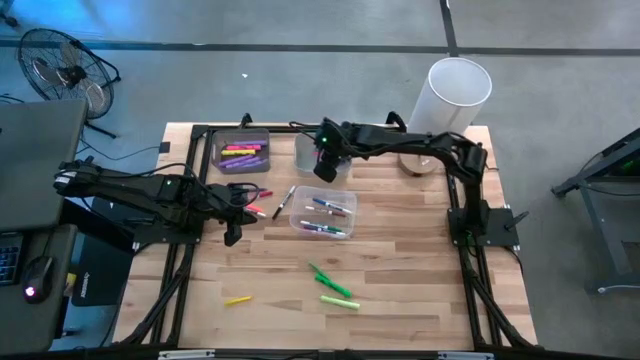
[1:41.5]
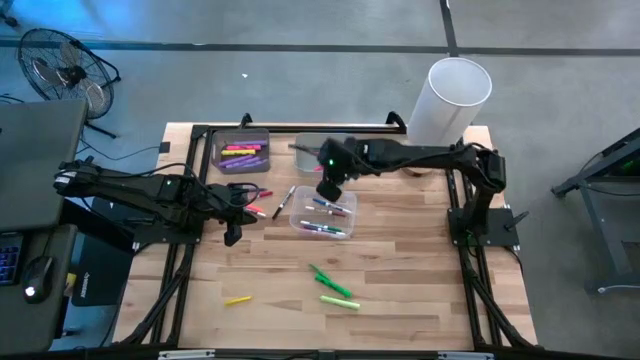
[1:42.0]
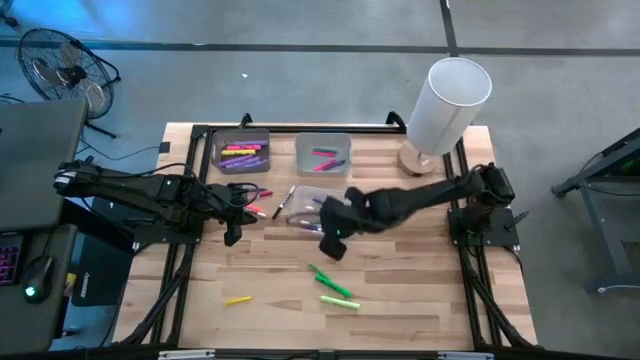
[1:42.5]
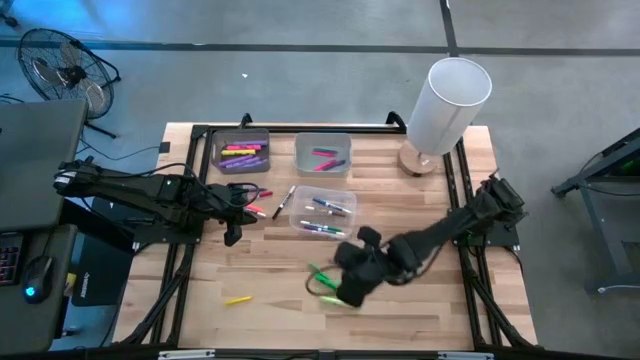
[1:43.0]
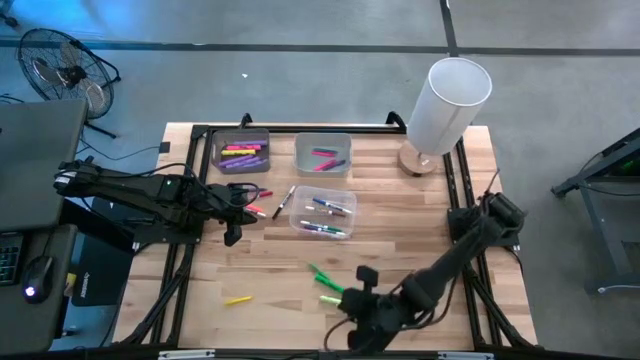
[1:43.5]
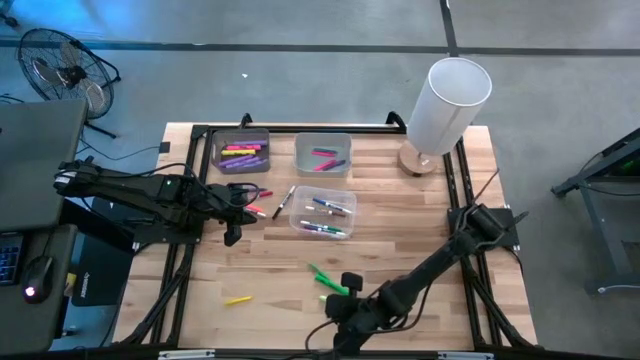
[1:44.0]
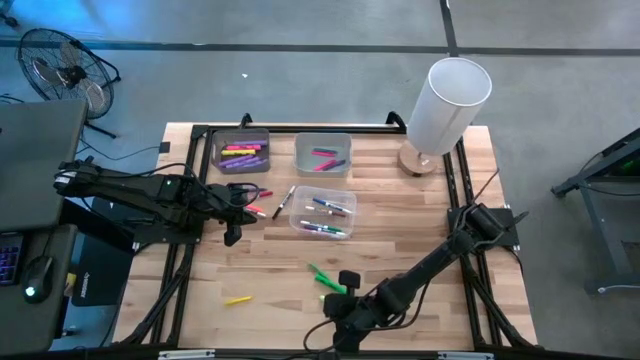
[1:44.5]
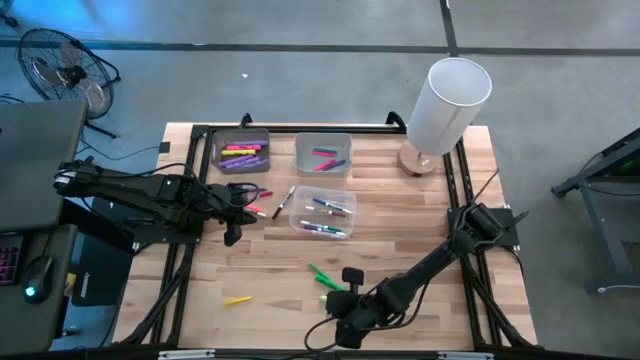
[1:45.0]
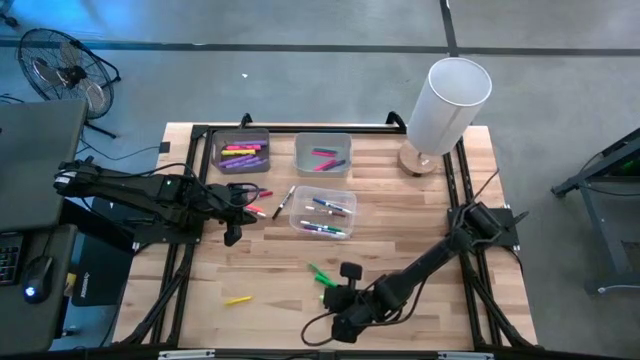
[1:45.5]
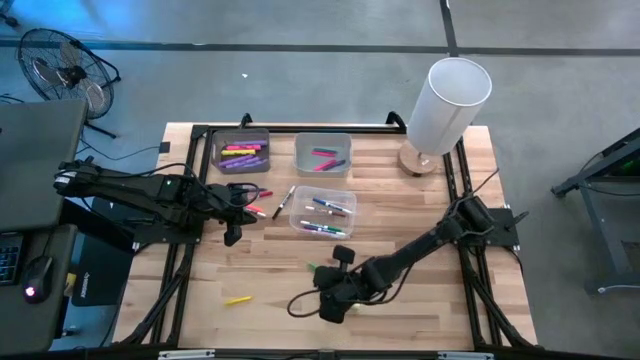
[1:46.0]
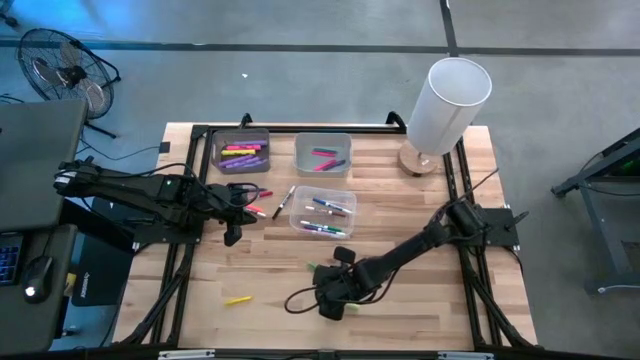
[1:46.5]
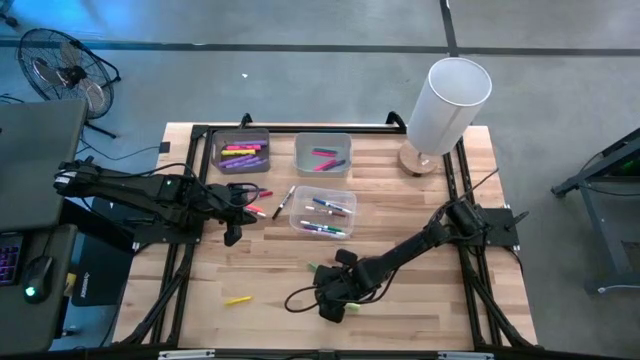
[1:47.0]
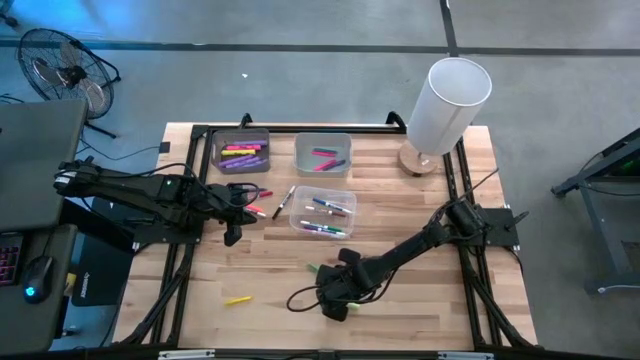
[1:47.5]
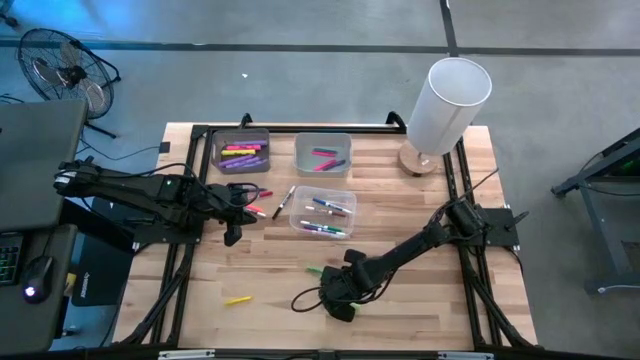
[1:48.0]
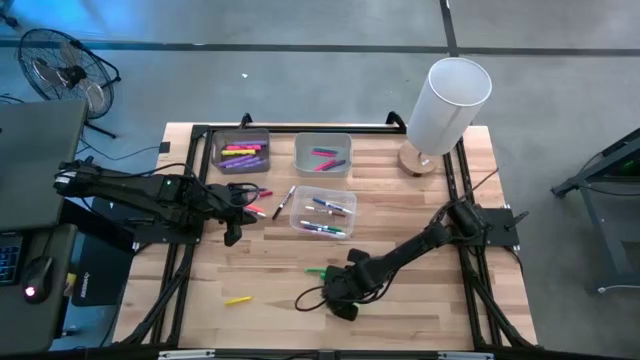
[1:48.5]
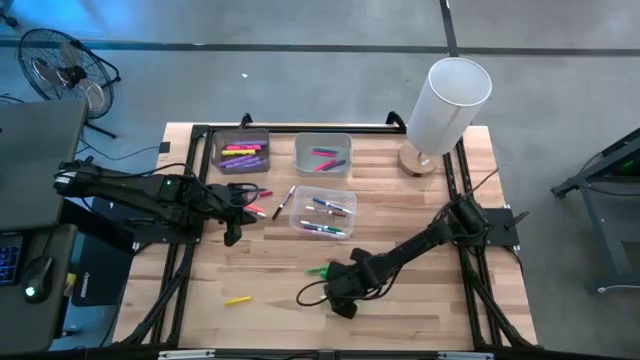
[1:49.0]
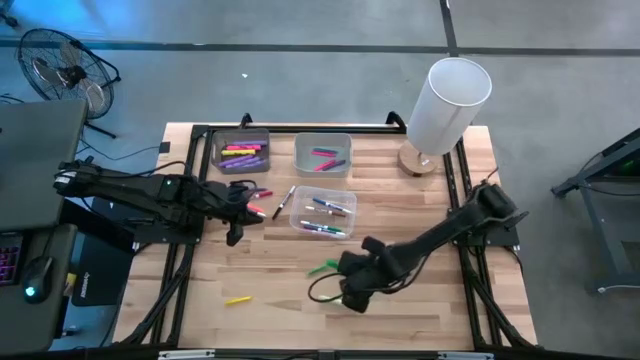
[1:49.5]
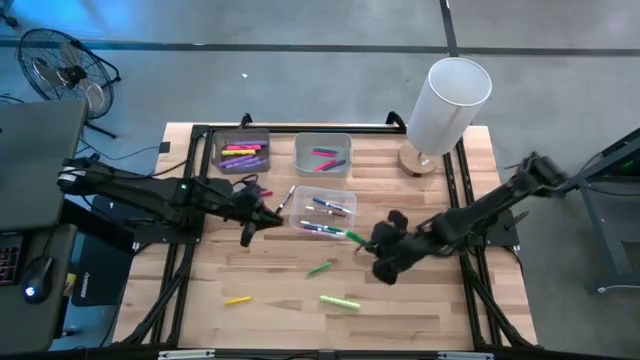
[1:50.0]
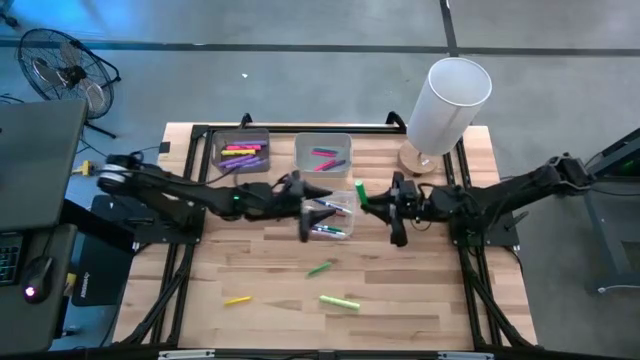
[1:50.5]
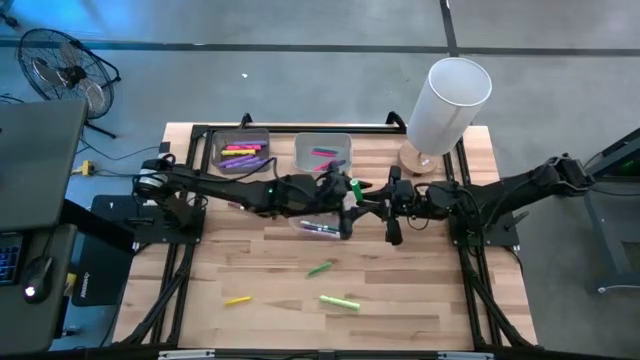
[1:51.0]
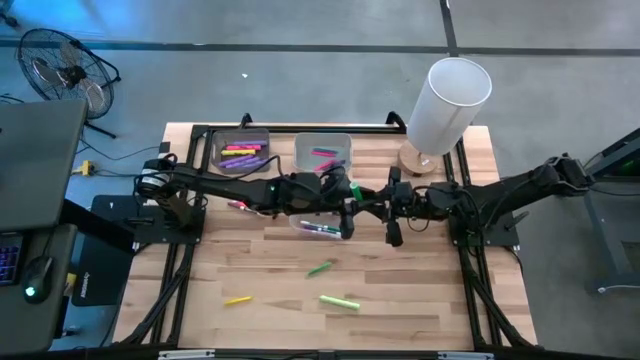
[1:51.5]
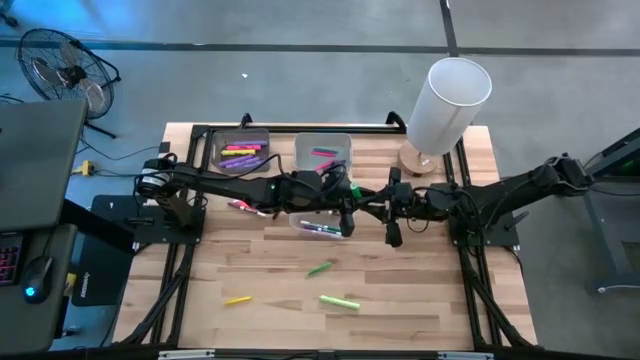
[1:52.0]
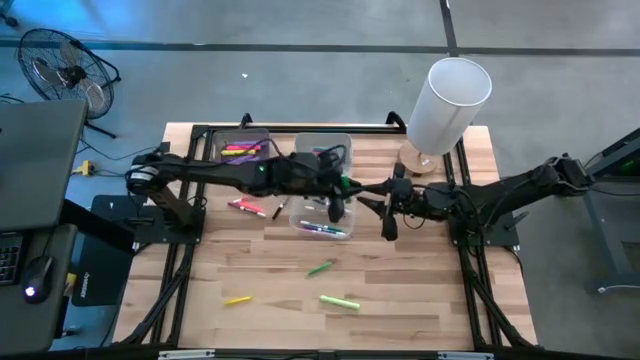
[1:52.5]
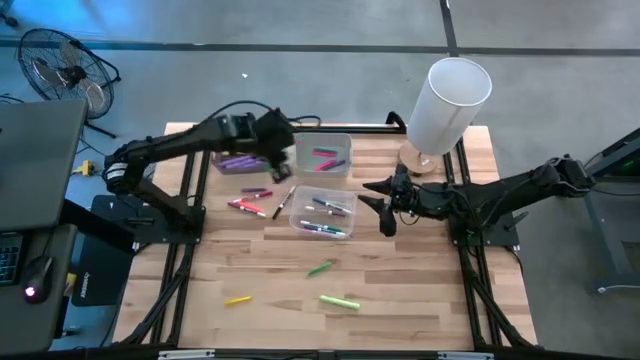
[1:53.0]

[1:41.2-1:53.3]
Task: Pick & Place Markers
Put the green highlighter into the black bin

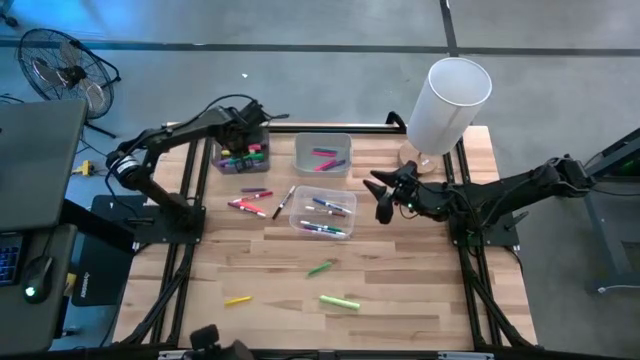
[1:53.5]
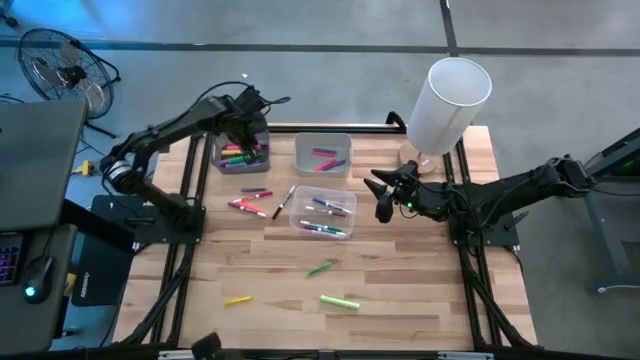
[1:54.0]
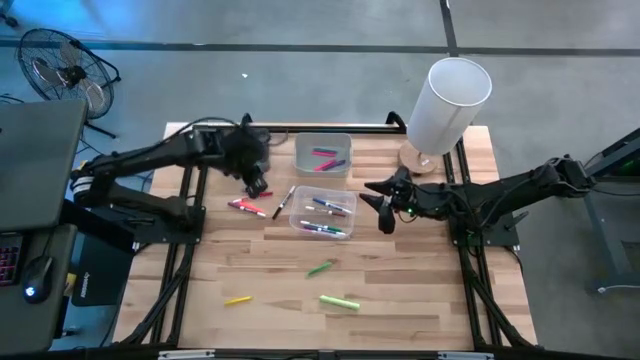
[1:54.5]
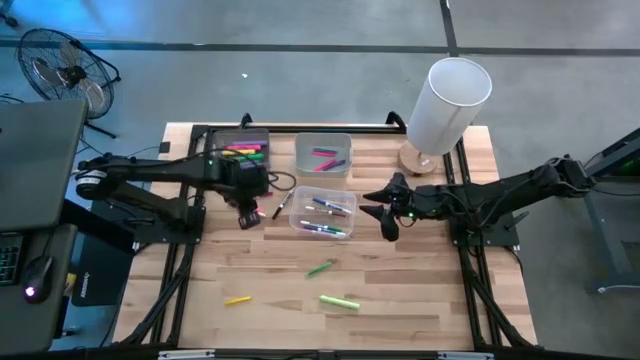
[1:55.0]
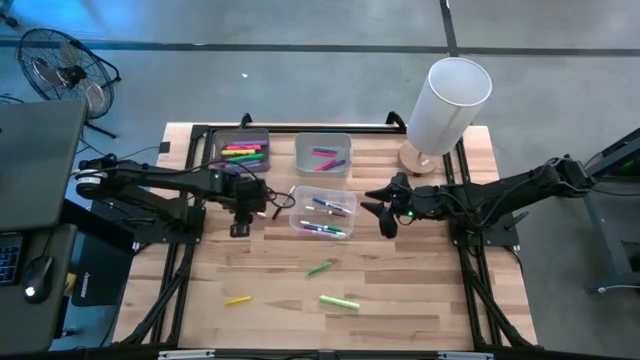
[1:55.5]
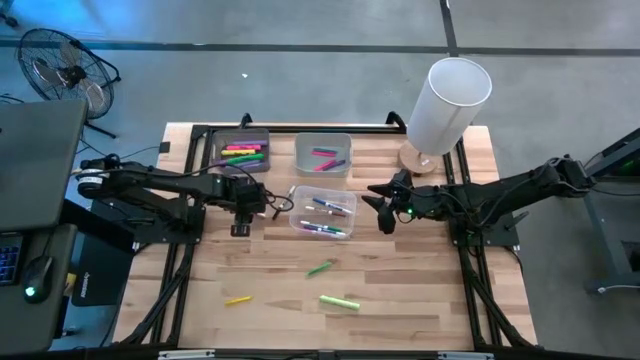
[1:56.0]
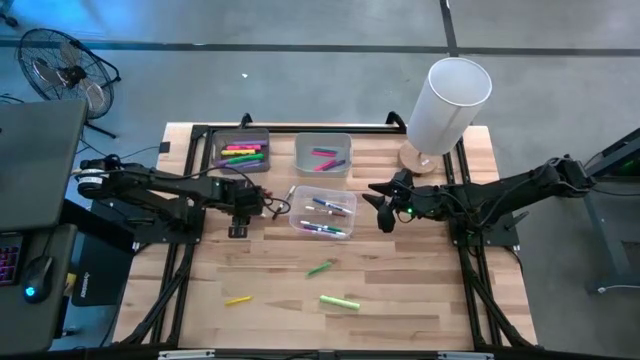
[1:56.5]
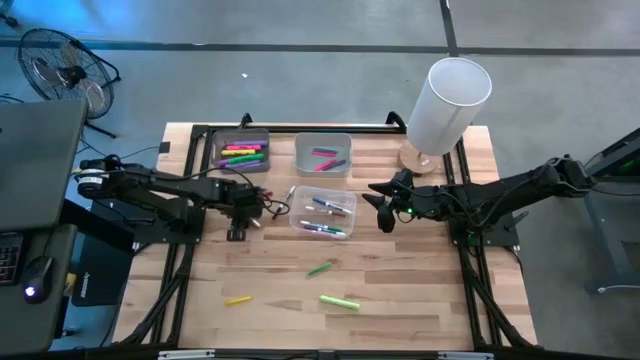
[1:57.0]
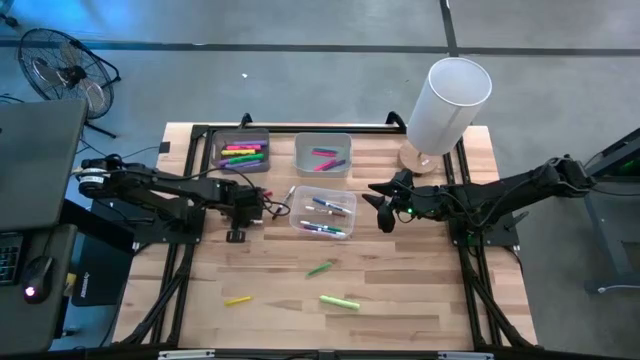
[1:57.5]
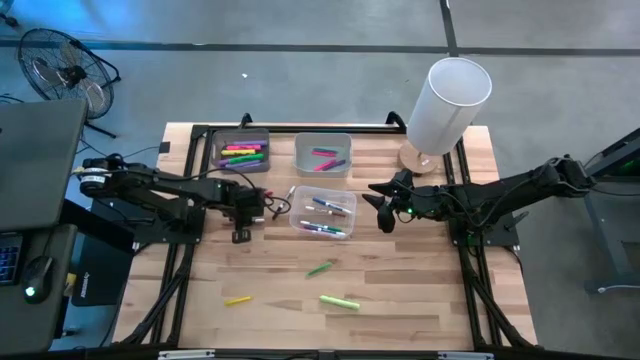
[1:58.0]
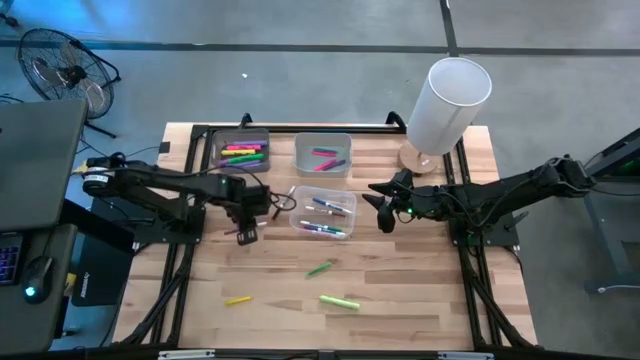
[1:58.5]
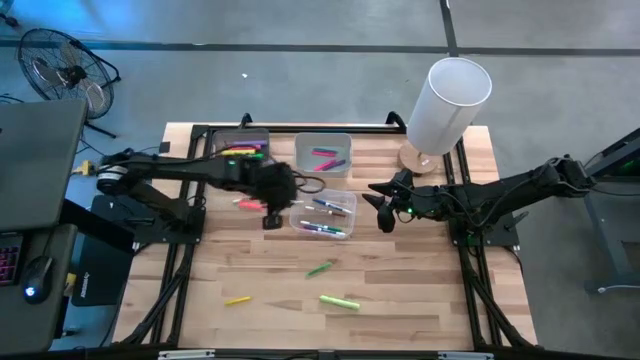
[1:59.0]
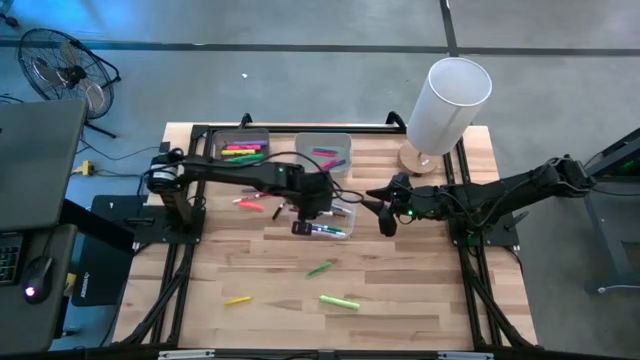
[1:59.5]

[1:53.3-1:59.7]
Put the purple marker into the white bin

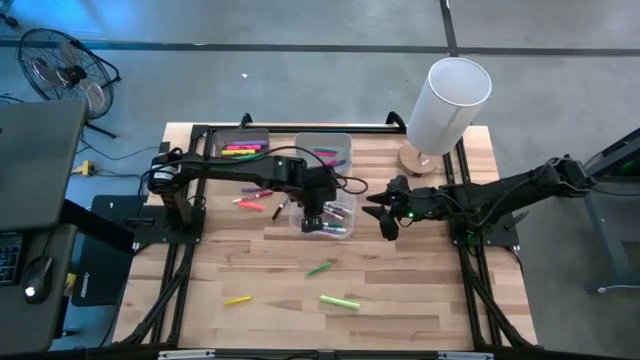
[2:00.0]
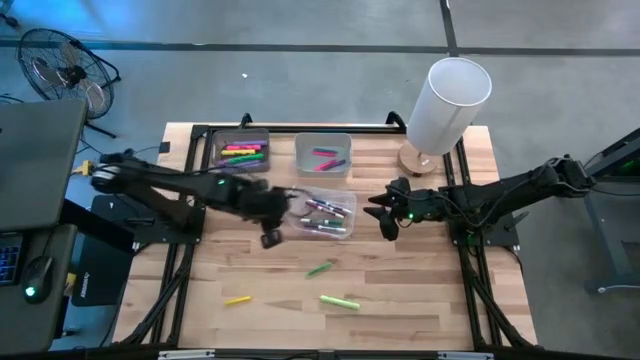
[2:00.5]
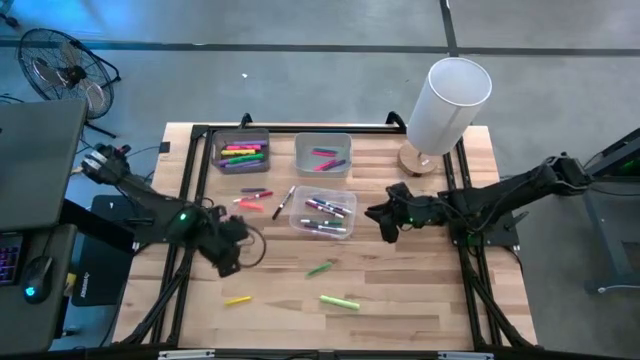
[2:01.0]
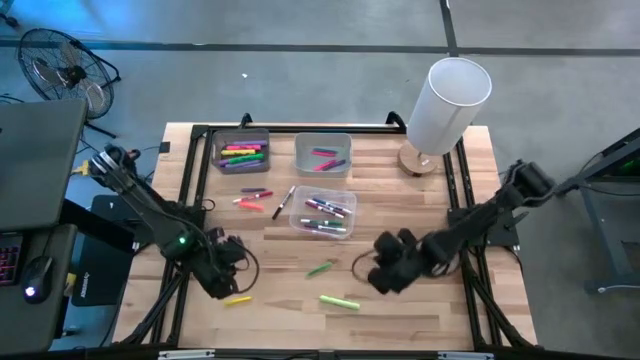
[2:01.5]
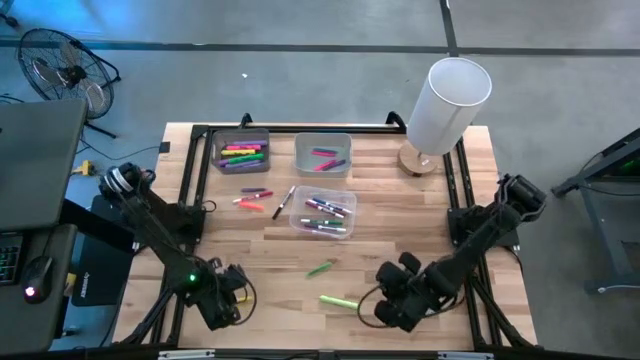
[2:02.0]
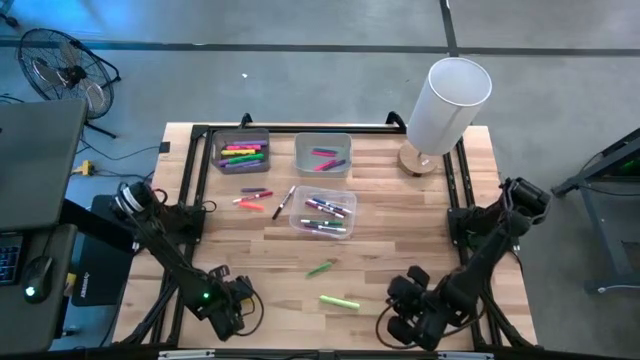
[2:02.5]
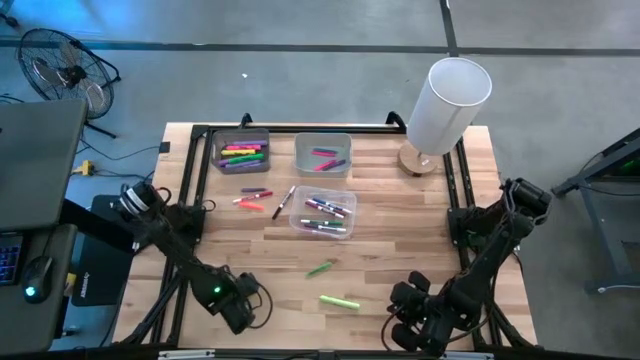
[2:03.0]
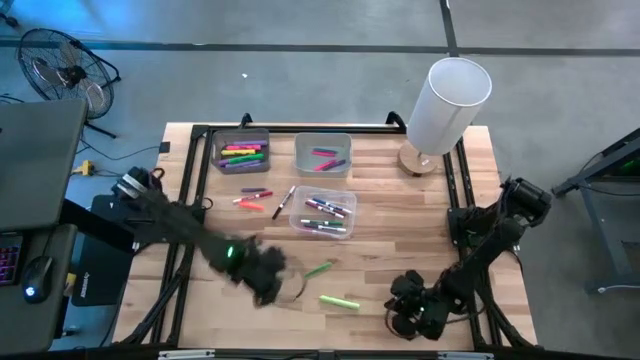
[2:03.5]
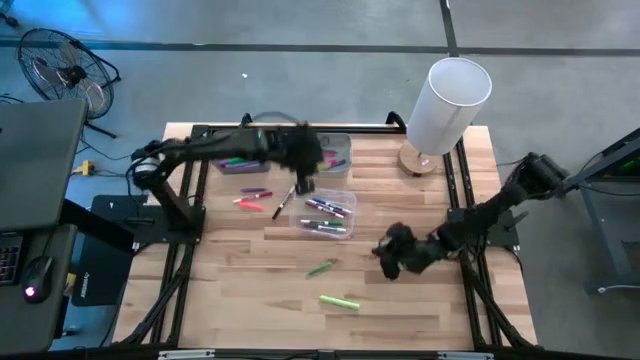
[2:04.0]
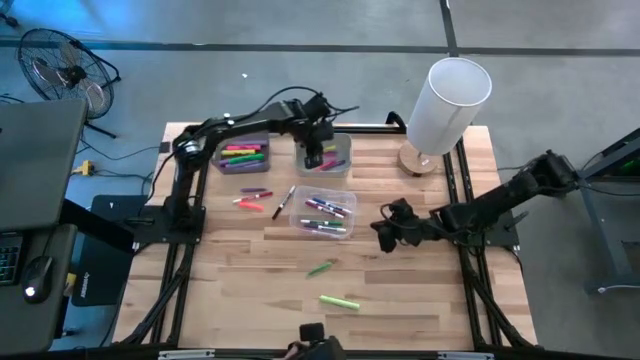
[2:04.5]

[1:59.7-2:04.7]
Put the yellow pen into the gray bin
